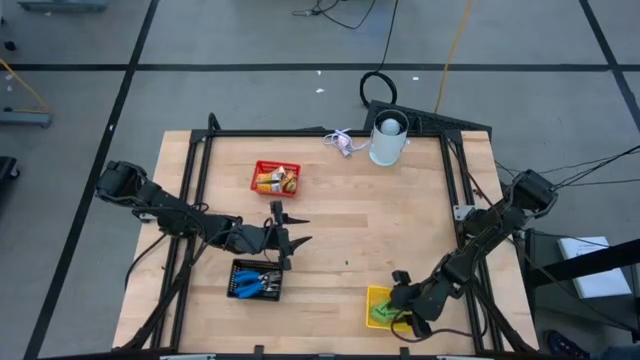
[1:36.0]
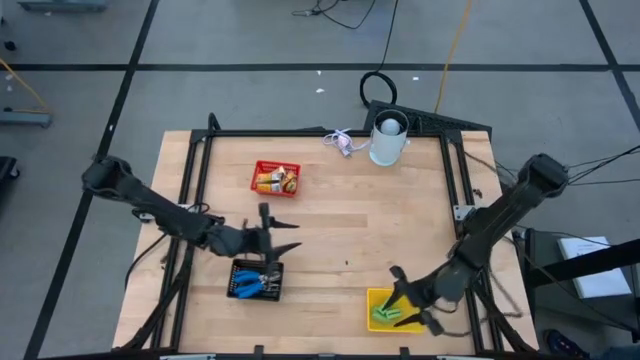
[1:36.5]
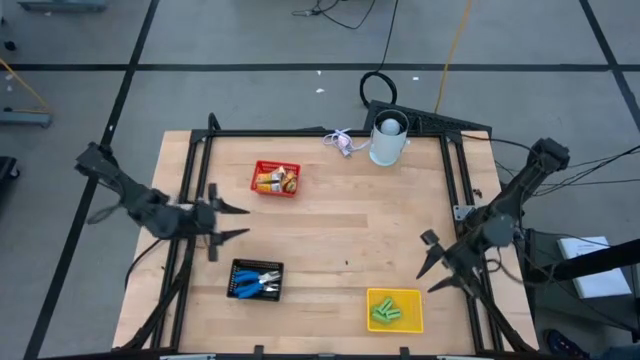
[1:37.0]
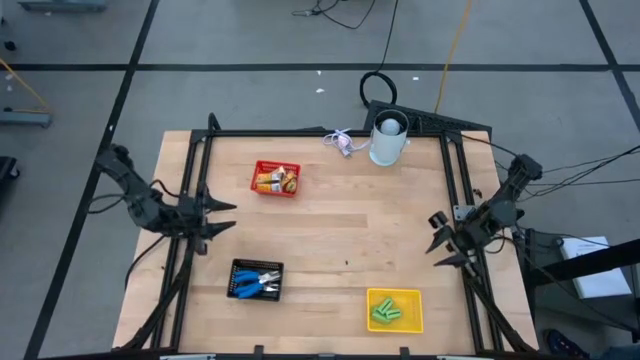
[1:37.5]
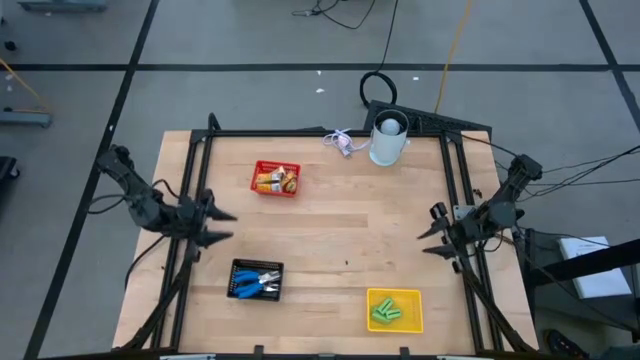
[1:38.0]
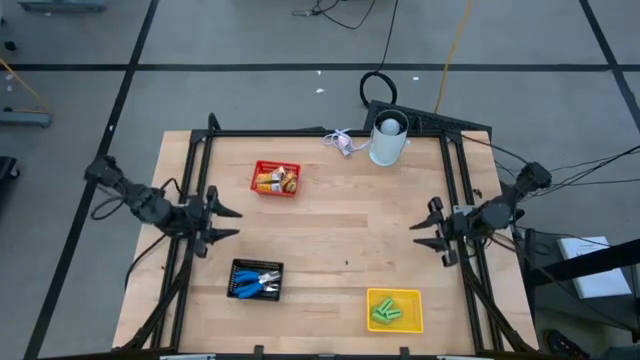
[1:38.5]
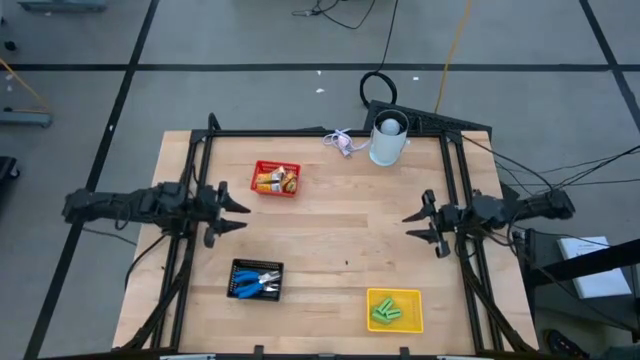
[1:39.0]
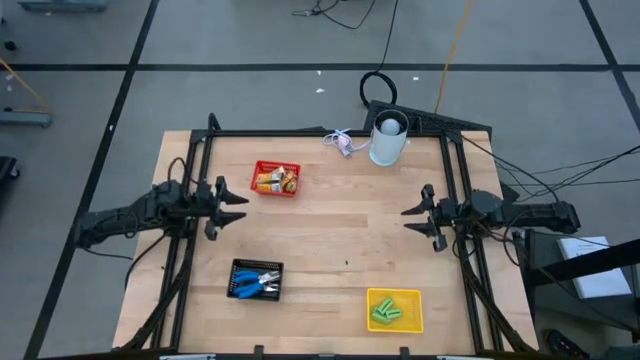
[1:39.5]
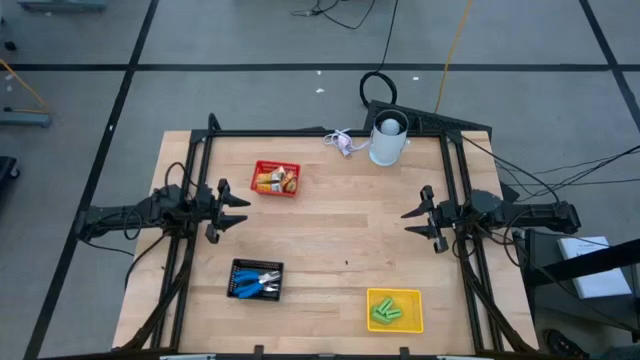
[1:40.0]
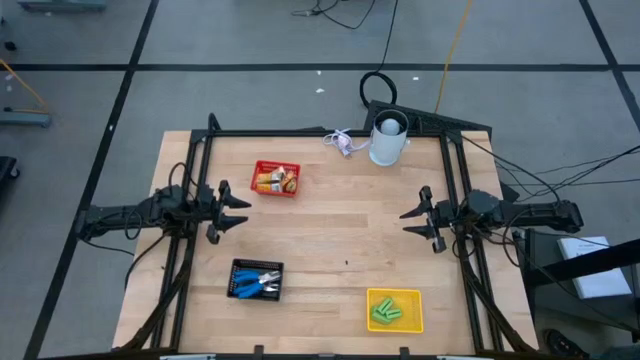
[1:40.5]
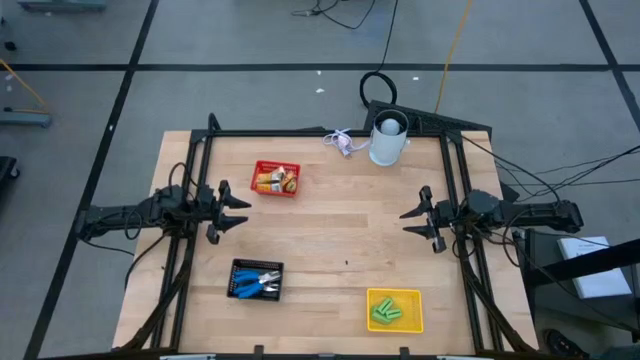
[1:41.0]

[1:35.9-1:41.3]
Task: Pick & Place School Supplies
Return to Home Position

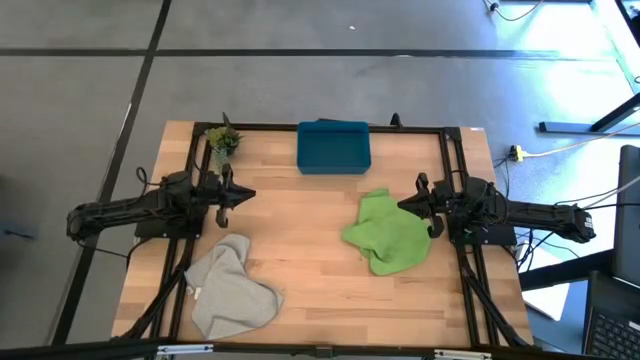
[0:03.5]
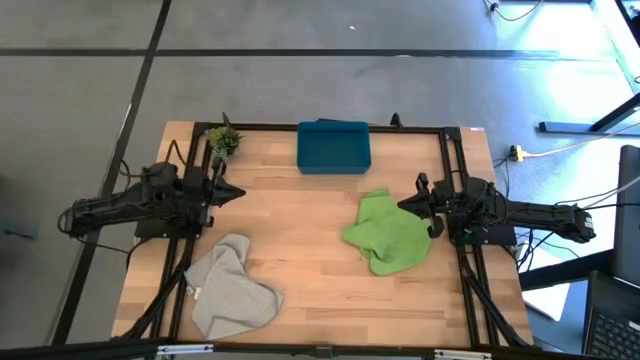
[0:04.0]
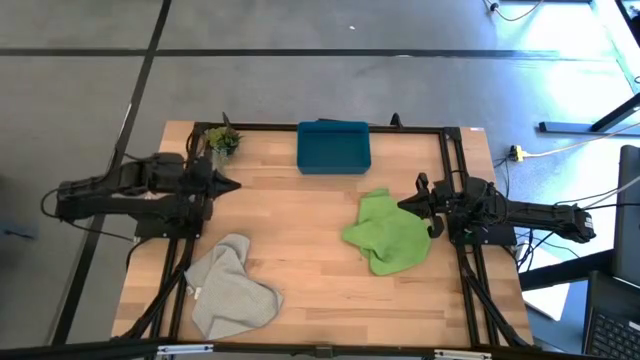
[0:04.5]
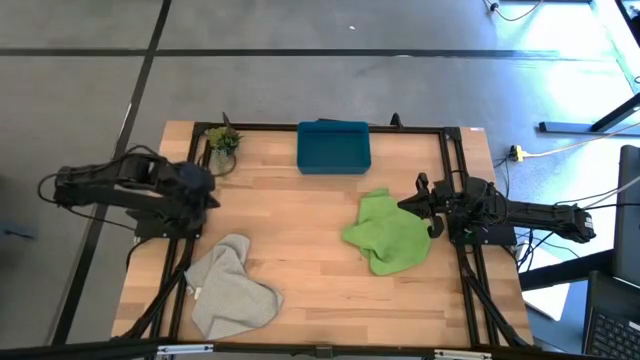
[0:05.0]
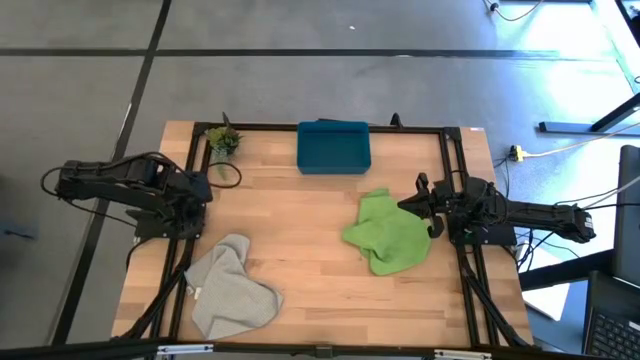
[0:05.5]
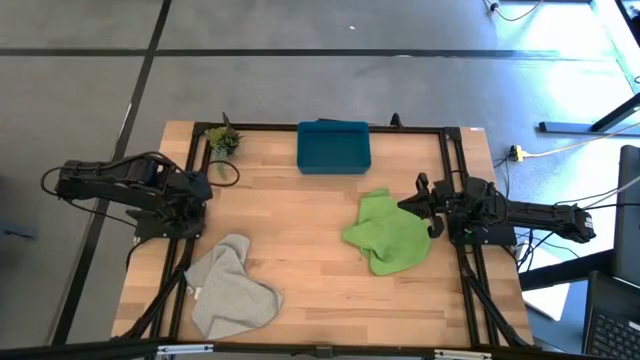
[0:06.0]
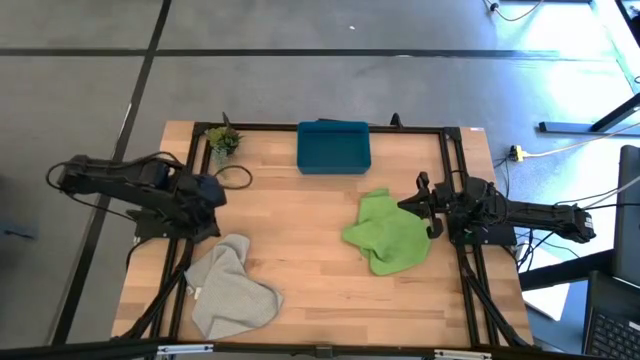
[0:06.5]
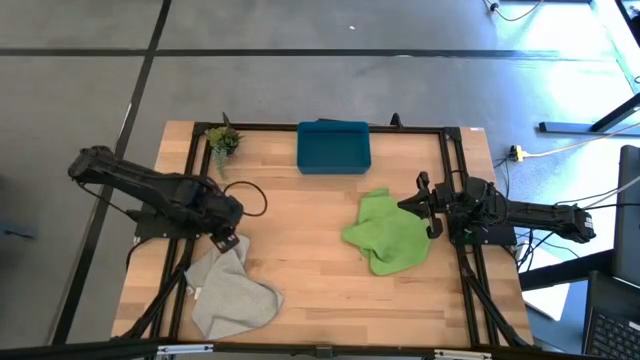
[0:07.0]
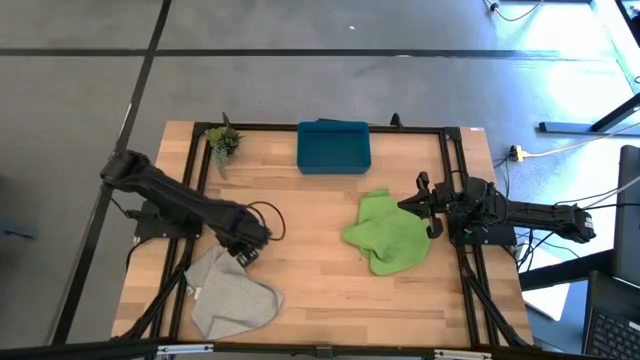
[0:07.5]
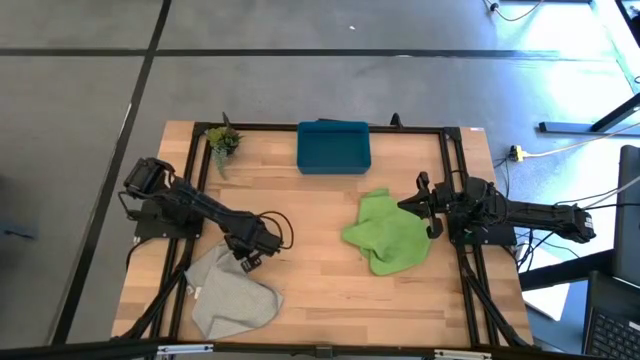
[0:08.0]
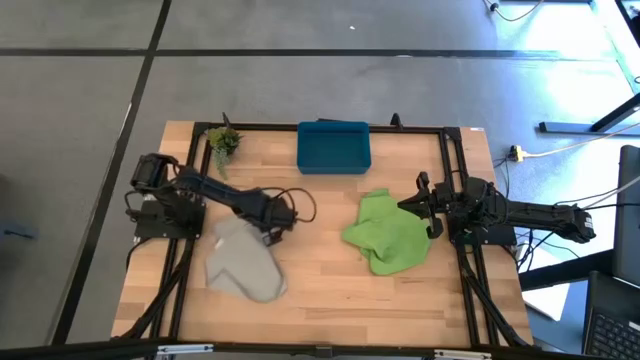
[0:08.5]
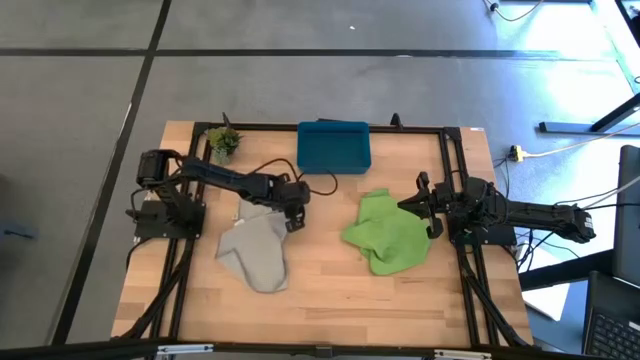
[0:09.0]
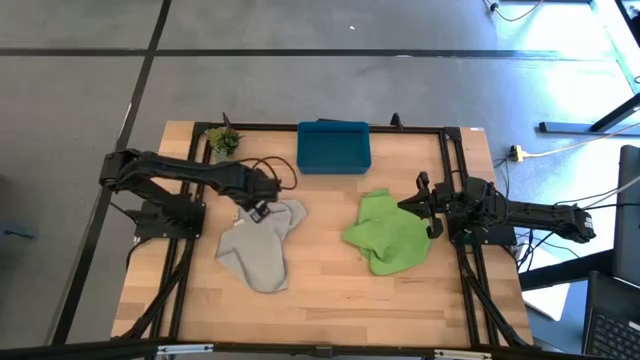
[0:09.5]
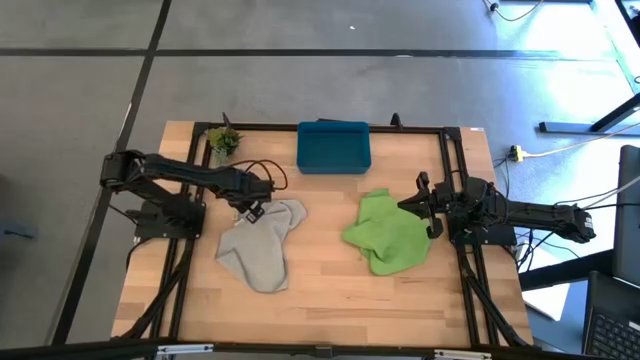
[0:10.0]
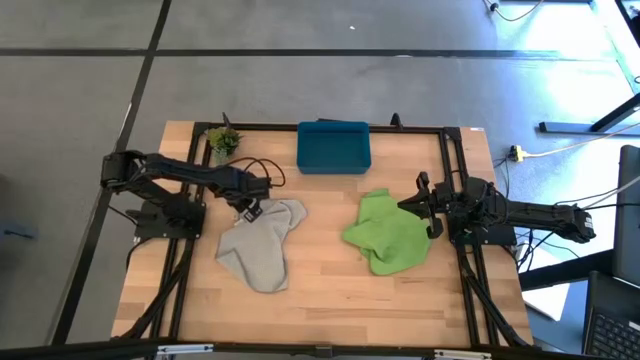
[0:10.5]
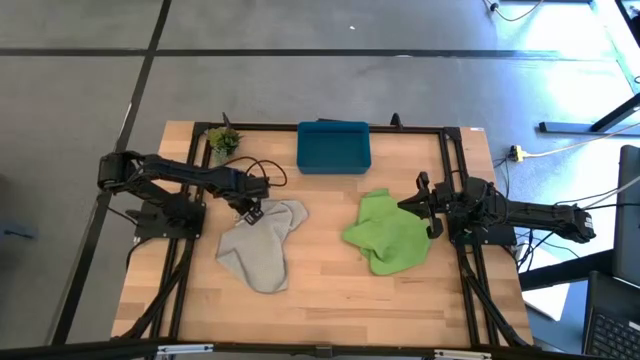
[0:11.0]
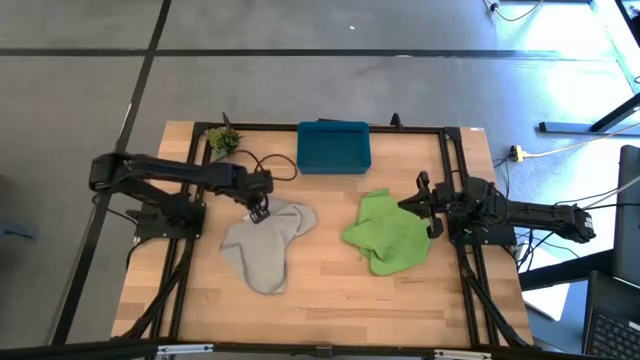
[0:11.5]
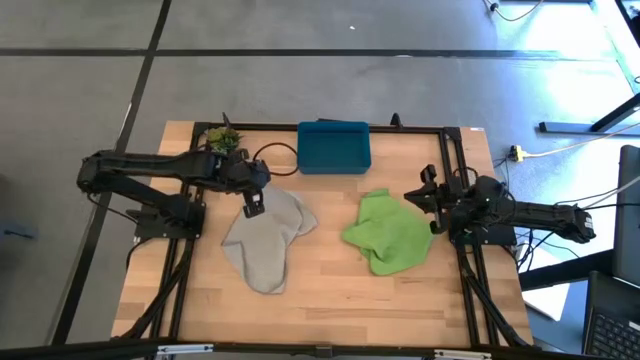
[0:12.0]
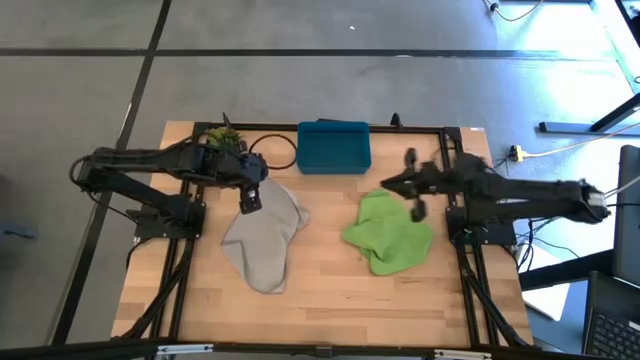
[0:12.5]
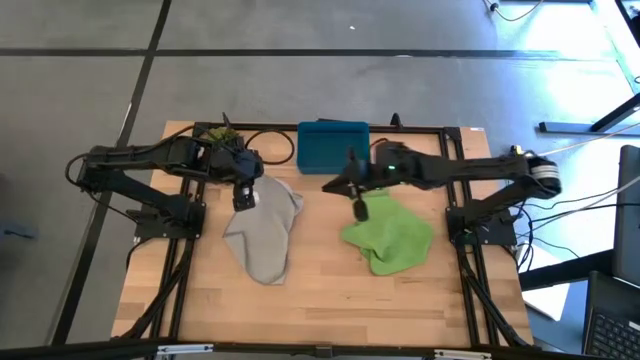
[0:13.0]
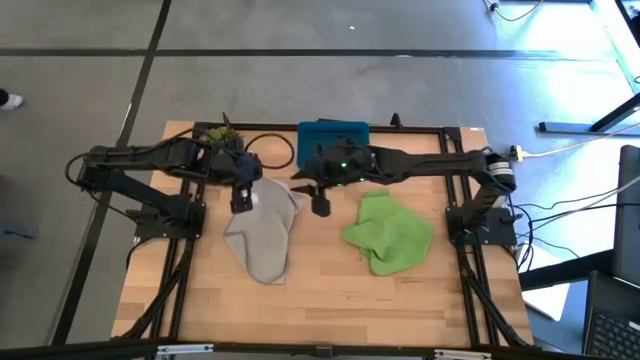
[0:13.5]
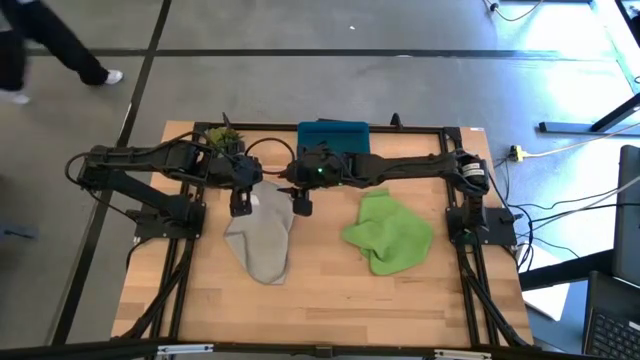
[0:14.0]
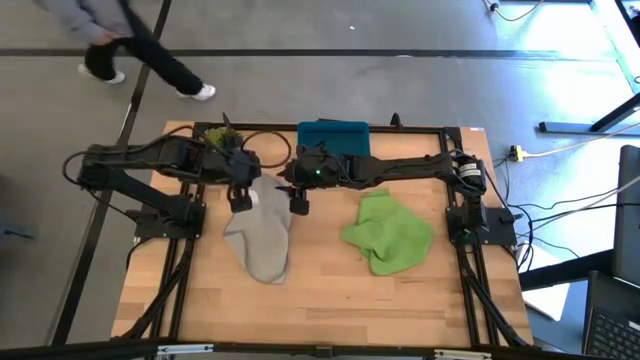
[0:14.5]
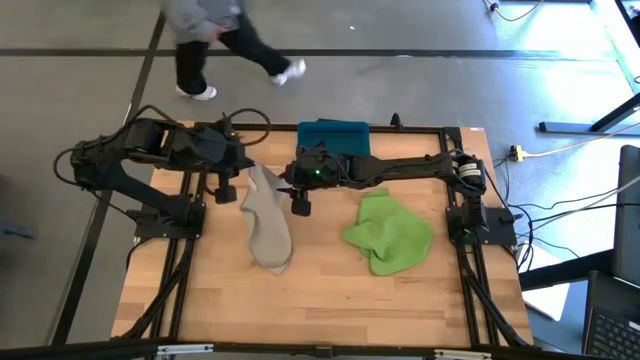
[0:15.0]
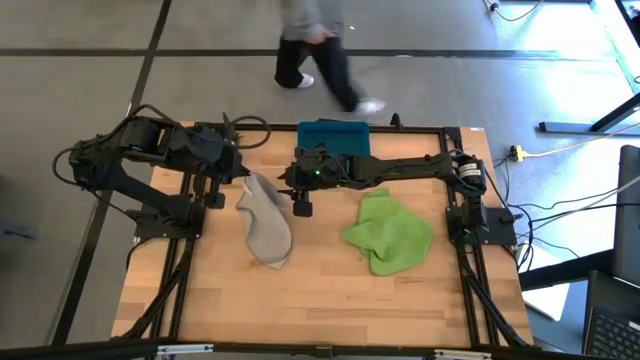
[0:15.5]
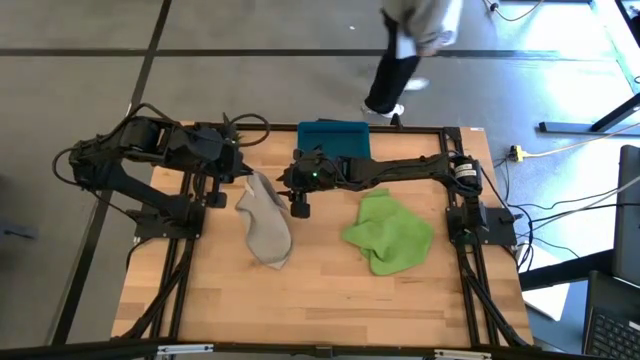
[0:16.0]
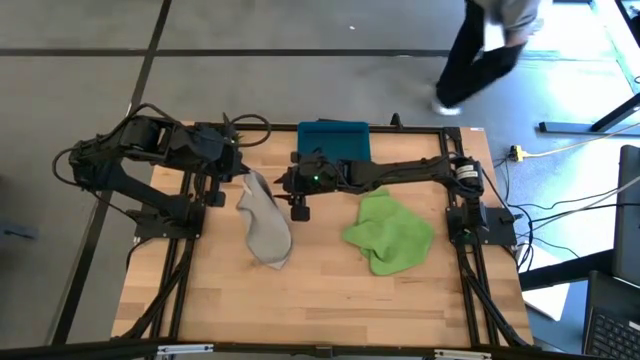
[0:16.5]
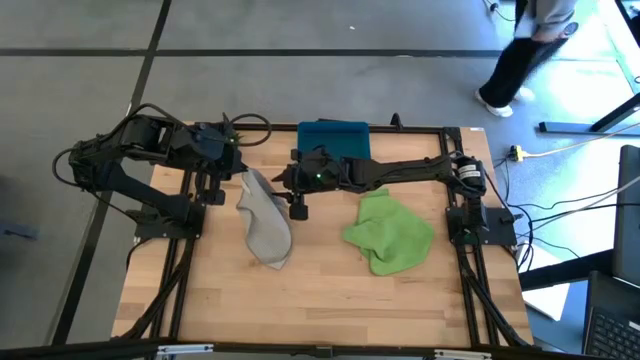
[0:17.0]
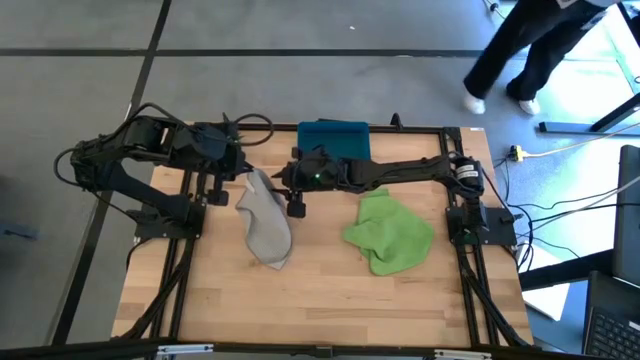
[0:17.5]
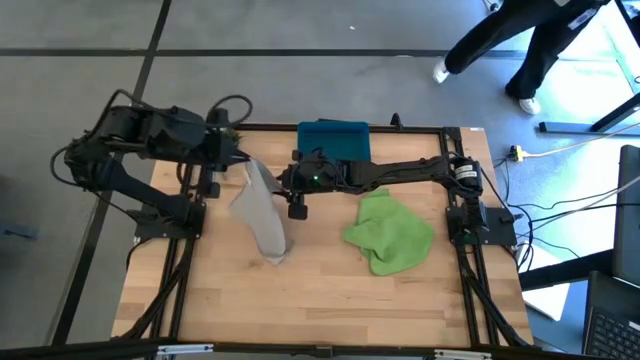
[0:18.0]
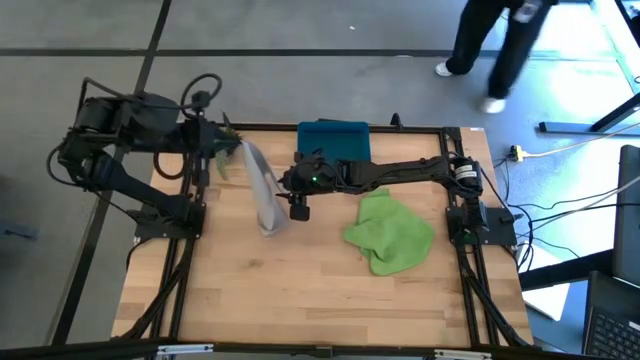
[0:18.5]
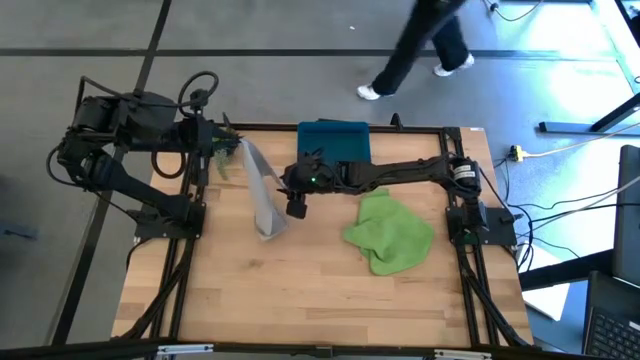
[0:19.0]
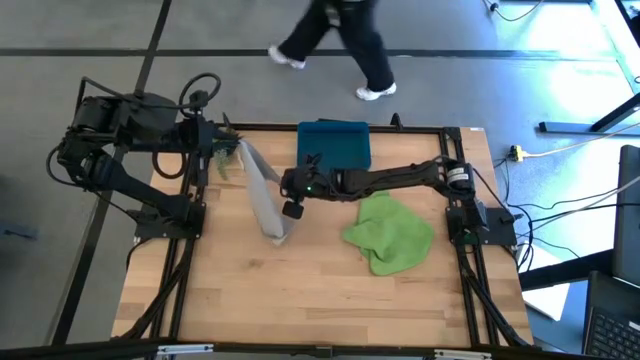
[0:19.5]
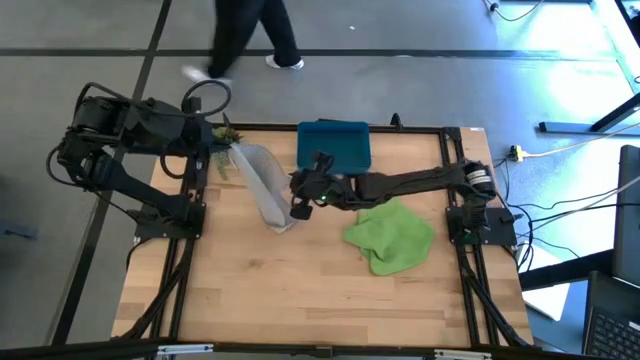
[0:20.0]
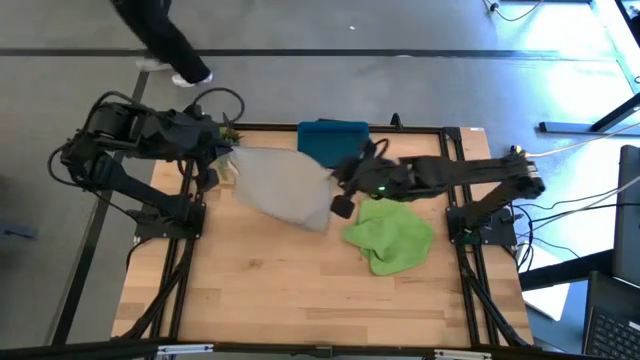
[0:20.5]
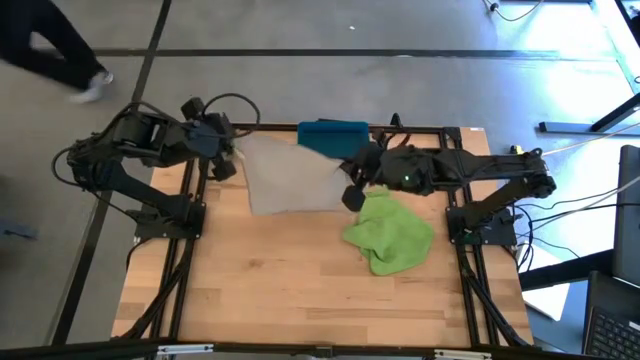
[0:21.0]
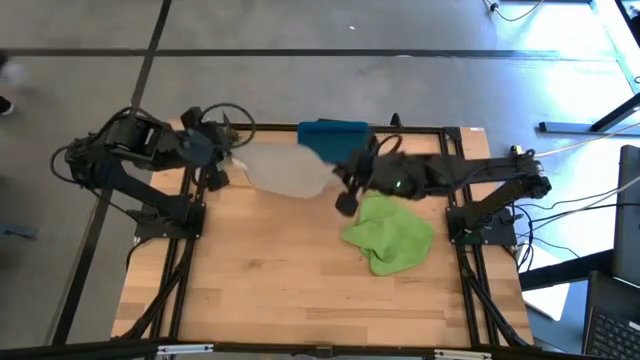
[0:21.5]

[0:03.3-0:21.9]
Task: Roll microfiber towels into tight, uniform cylinder then place into a basket
Roll the gray microfiber cloth
